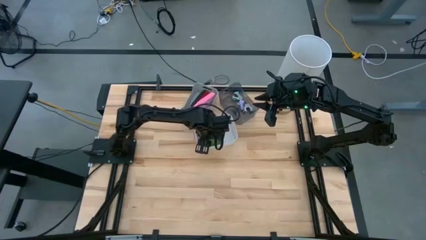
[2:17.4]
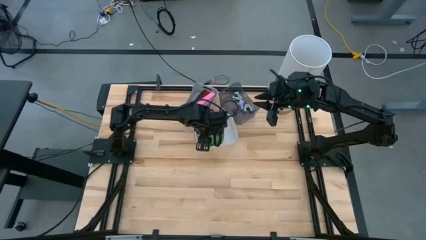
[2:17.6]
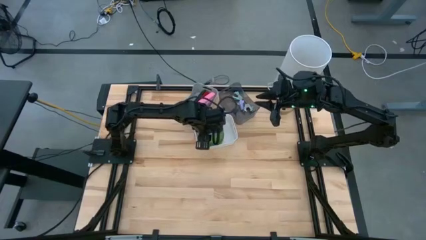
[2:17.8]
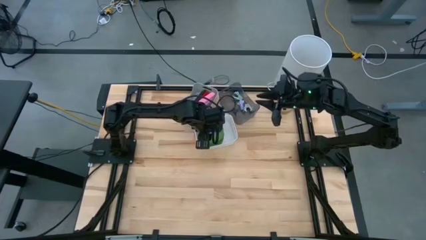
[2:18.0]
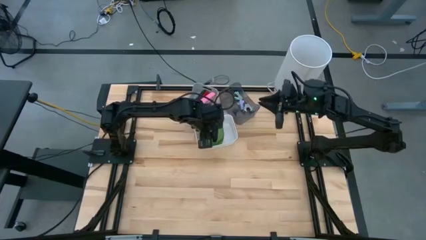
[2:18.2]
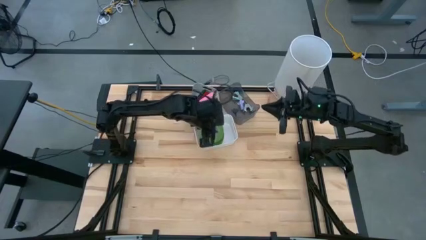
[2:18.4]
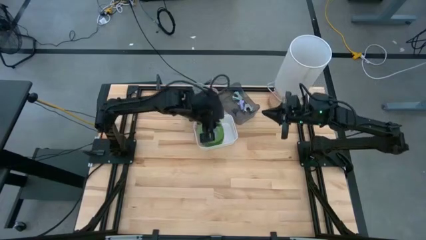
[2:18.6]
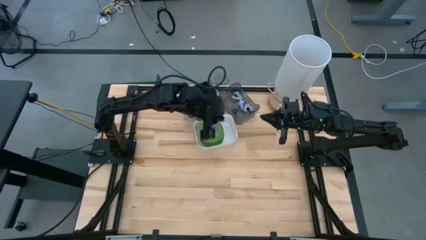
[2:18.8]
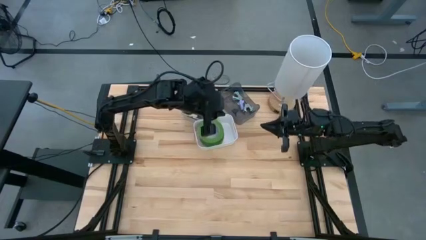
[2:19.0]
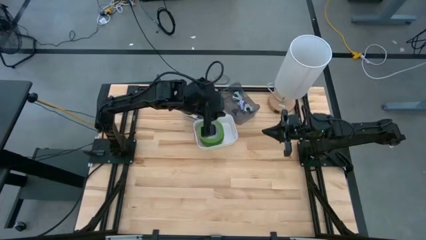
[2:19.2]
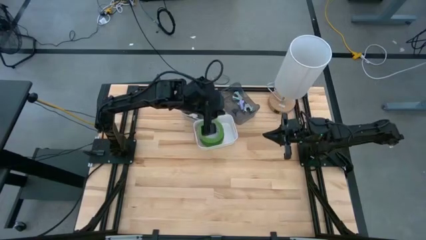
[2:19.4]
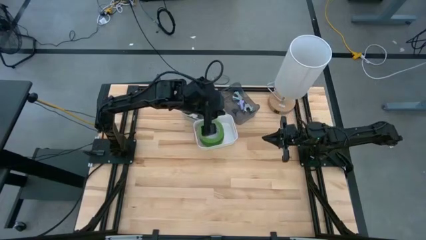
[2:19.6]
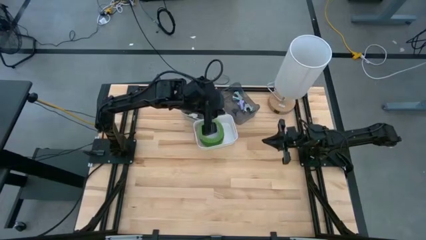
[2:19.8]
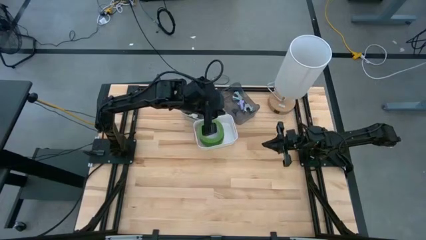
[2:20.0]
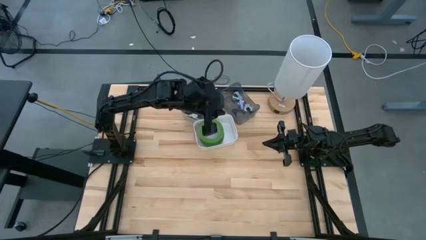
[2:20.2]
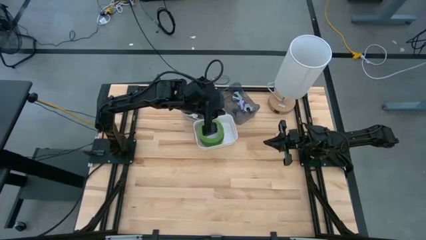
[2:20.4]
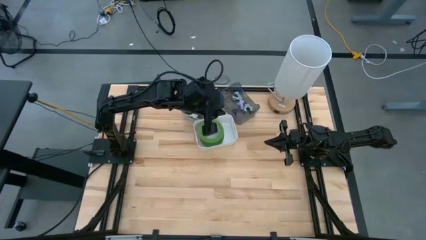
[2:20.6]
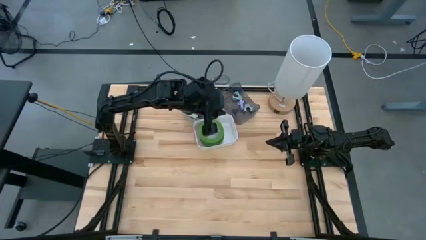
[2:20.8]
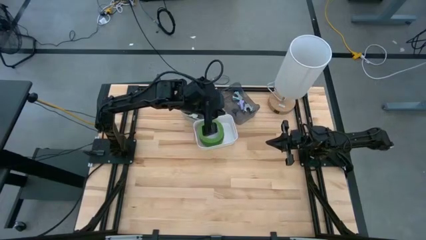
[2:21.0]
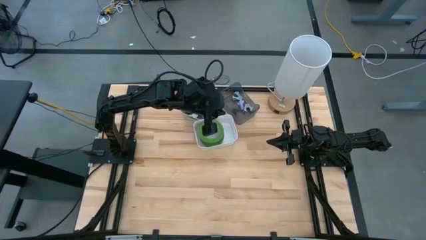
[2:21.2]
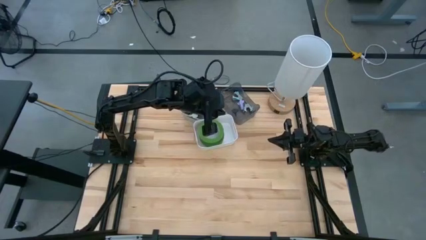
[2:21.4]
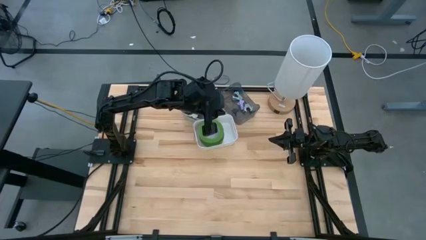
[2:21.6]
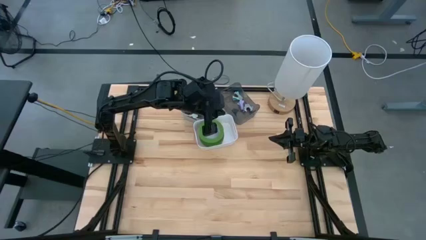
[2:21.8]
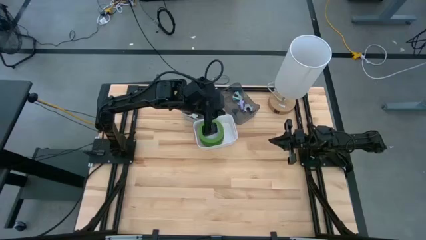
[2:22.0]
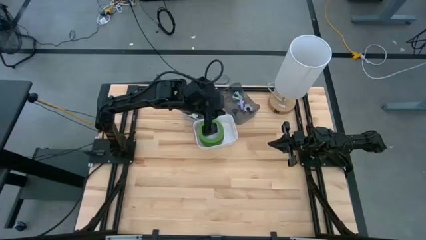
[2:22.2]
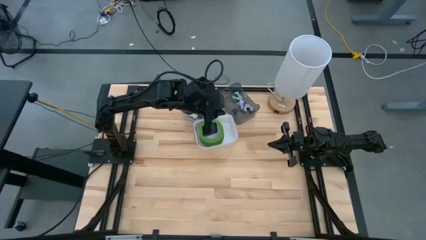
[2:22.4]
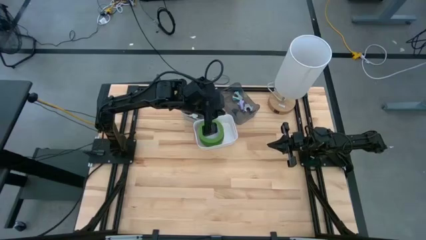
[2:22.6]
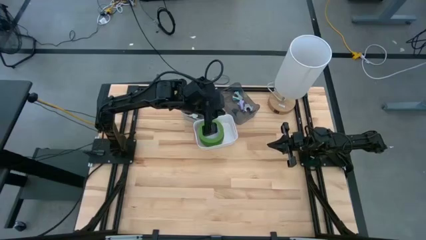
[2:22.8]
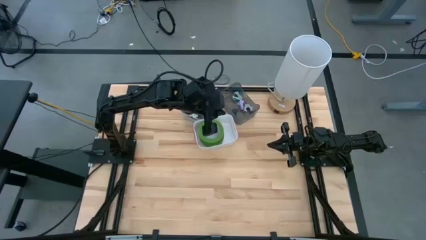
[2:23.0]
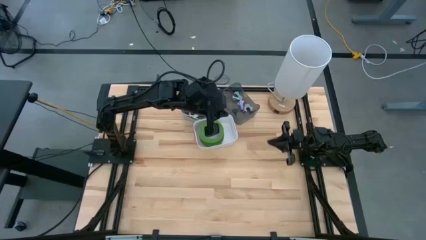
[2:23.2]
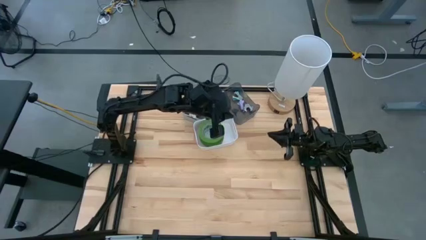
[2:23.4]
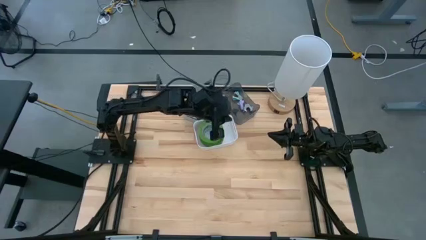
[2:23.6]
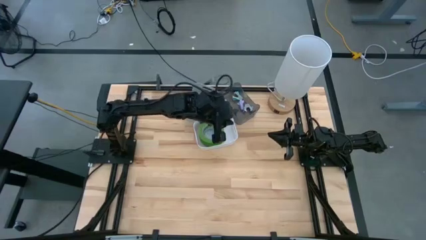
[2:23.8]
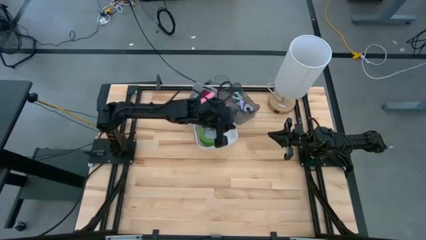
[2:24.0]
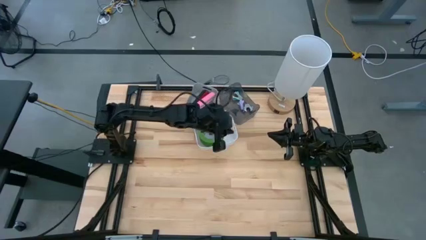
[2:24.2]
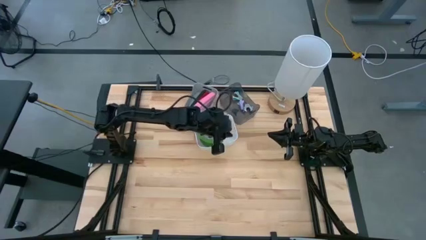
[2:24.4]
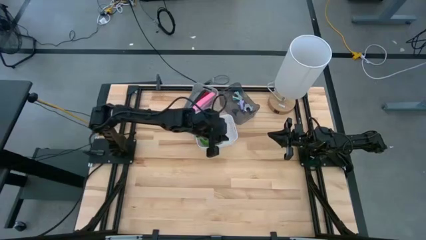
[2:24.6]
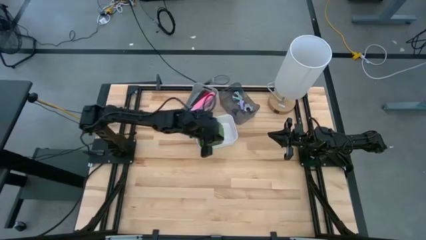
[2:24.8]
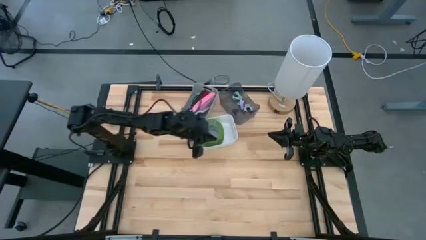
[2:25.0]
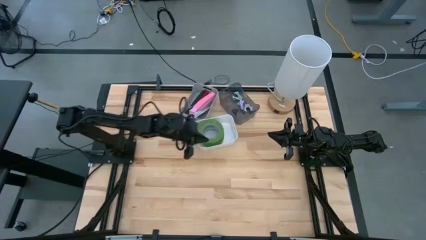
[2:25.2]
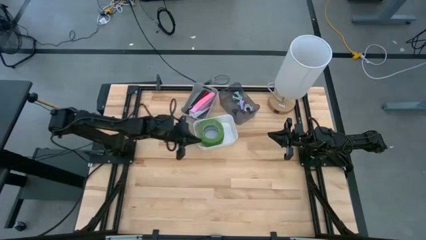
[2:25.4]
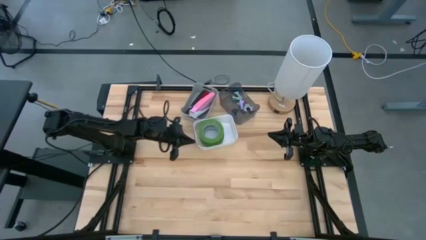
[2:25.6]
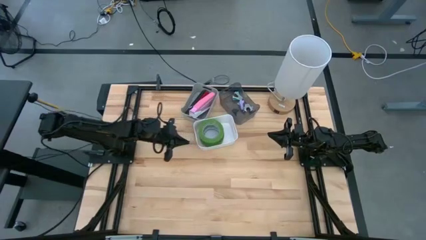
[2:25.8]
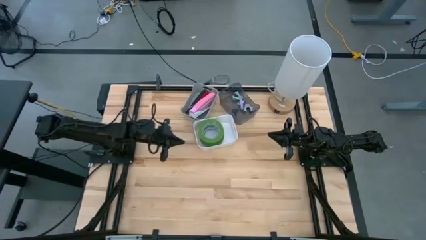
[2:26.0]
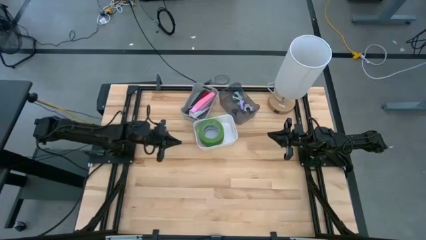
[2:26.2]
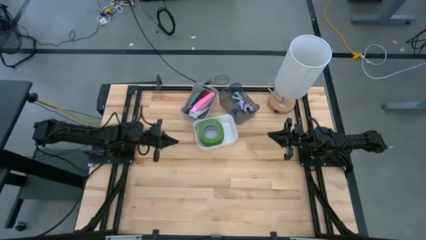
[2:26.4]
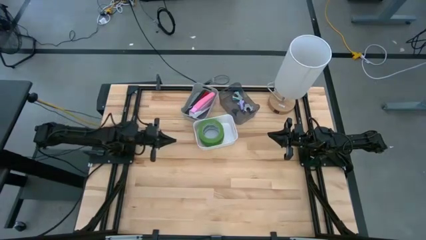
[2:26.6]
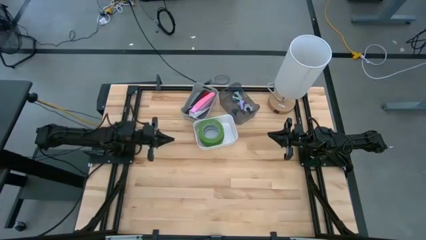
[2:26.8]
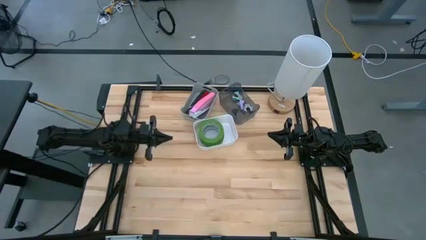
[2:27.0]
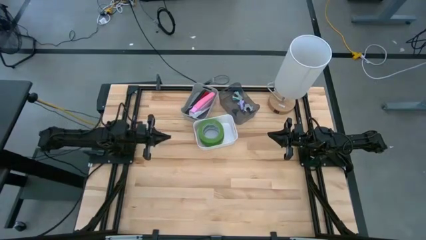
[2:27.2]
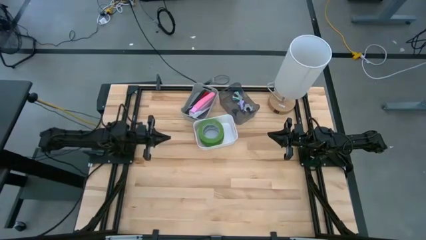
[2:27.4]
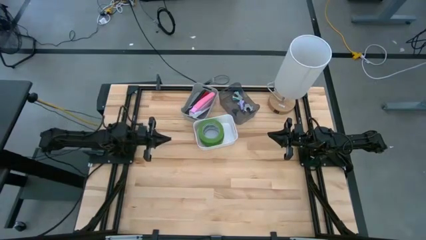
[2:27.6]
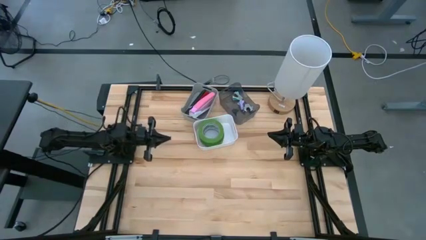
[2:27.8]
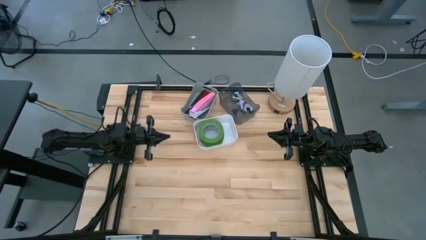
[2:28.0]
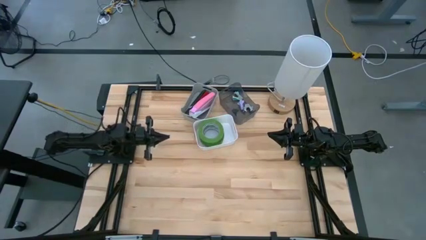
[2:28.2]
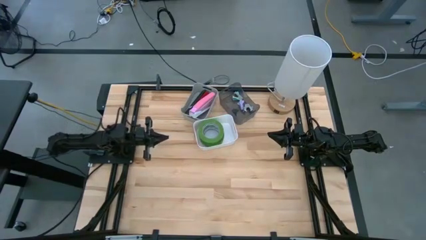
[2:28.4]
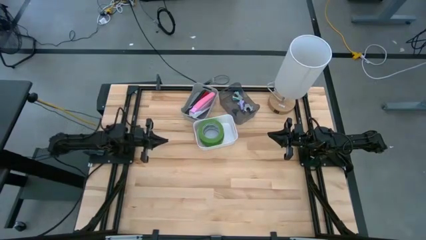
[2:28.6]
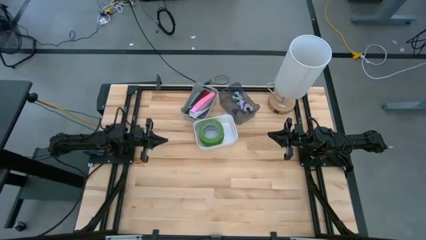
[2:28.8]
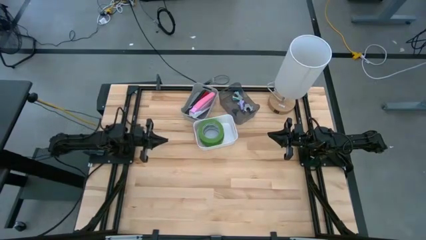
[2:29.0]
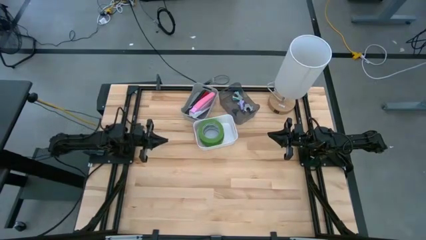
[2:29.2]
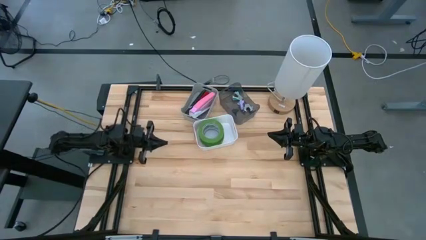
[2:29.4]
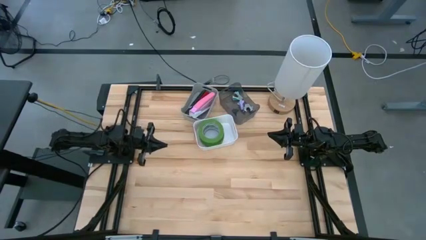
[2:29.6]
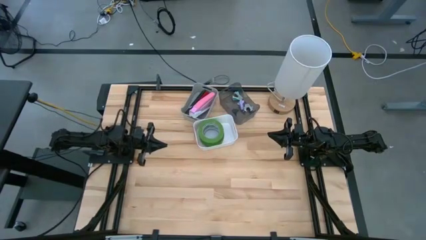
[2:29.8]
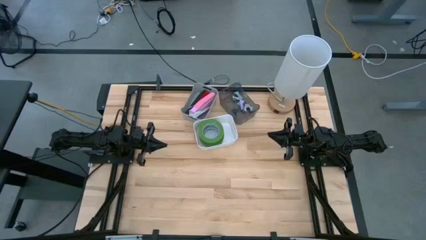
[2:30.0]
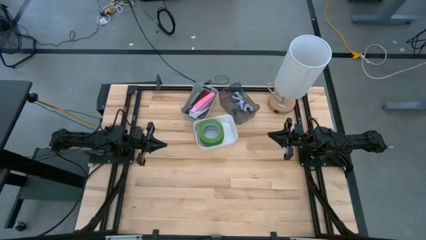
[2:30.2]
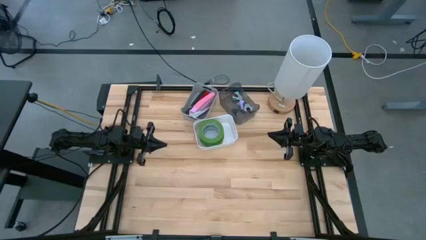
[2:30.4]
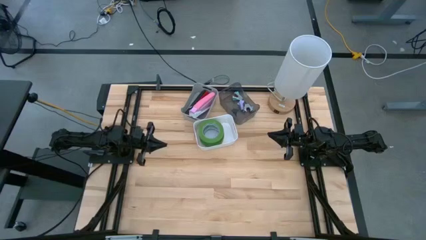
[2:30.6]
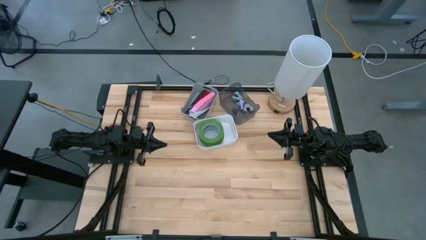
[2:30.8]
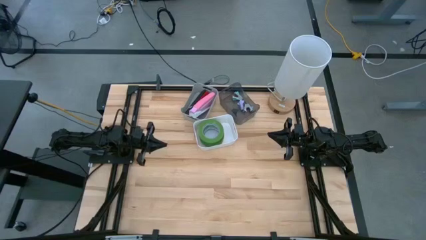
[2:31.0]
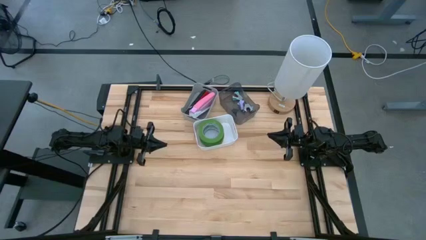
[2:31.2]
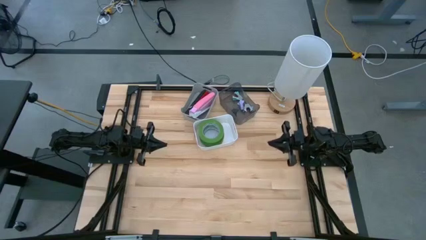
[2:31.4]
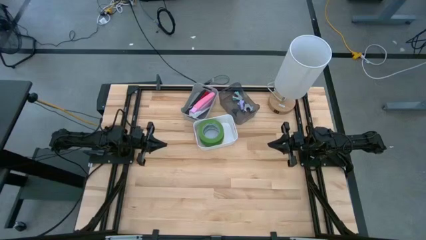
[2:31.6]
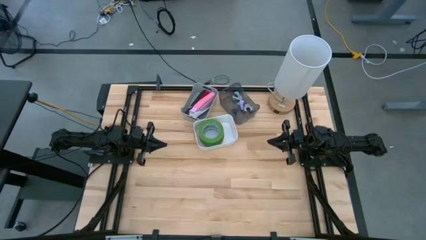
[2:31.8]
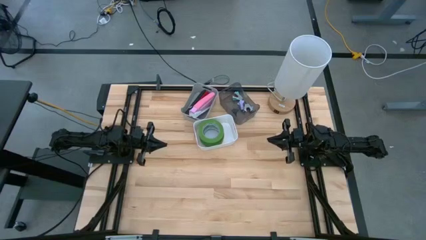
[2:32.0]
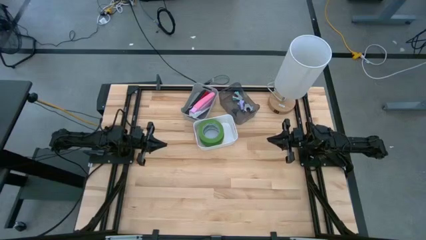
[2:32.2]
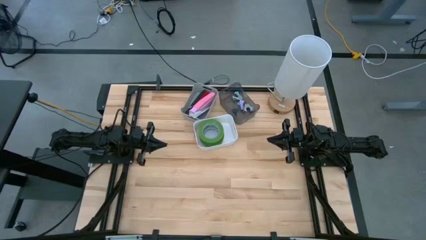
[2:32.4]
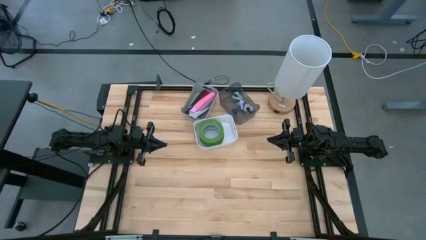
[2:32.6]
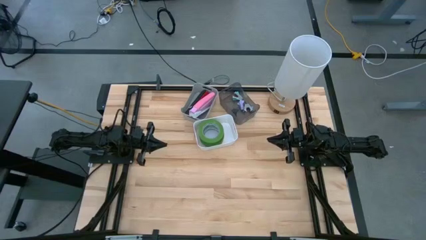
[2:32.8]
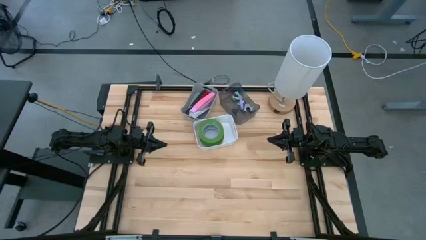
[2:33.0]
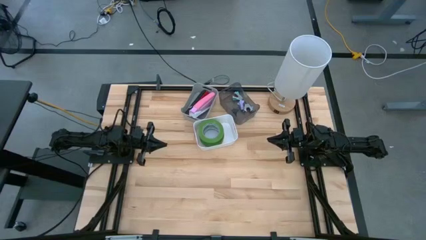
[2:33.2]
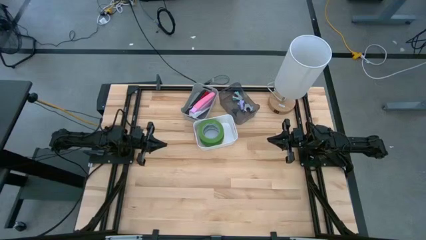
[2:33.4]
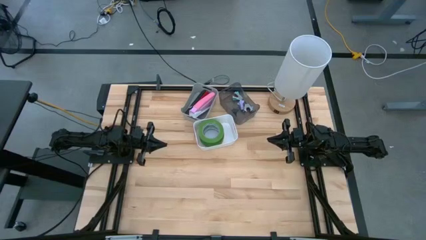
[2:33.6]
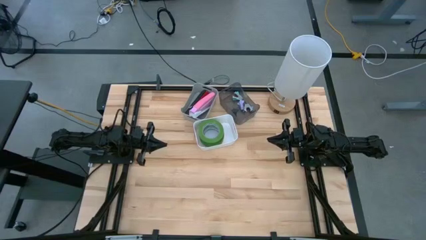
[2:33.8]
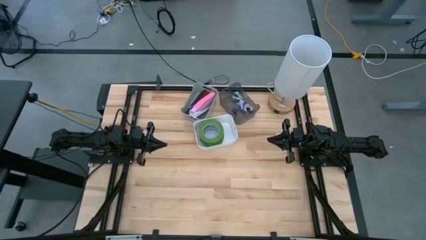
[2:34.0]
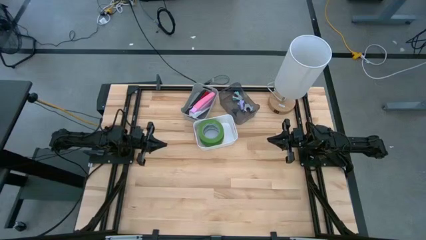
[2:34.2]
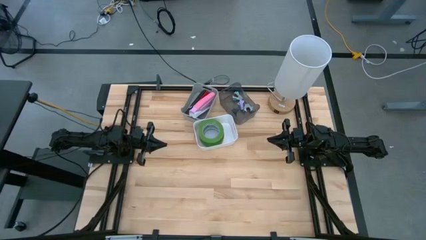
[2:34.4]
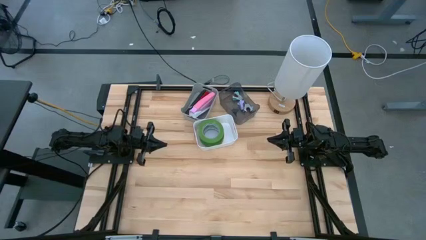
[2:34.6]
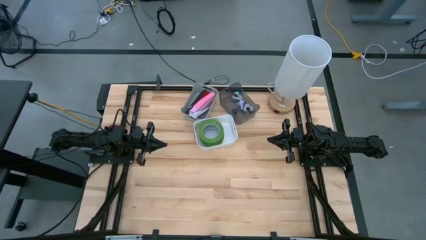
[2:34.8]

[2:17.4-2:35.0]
Task: Pick and place Stapler, Stapler remover, tape
Return to Home Position
